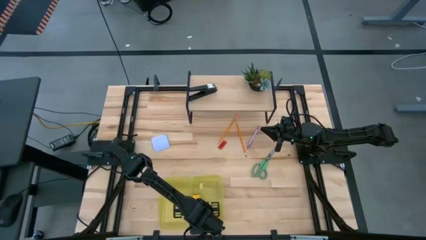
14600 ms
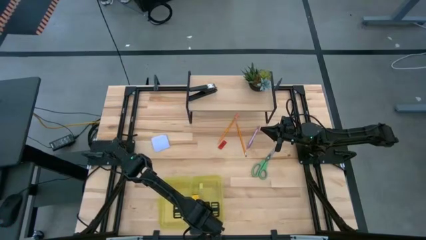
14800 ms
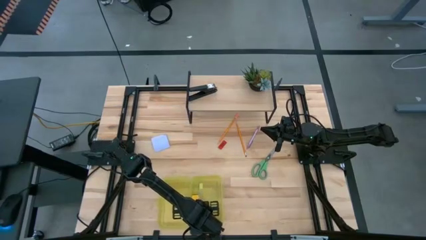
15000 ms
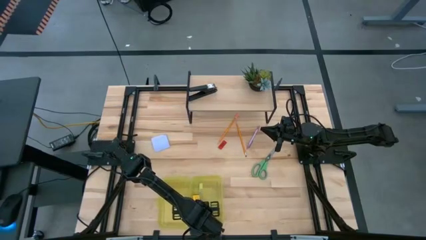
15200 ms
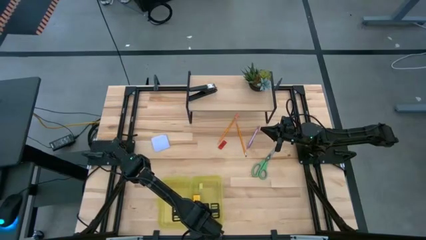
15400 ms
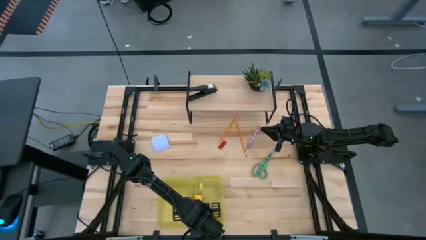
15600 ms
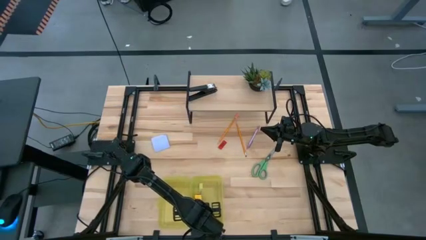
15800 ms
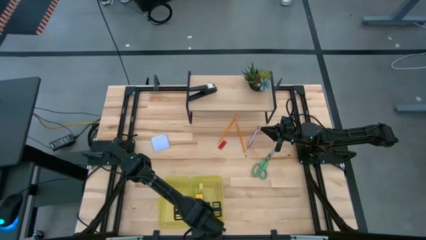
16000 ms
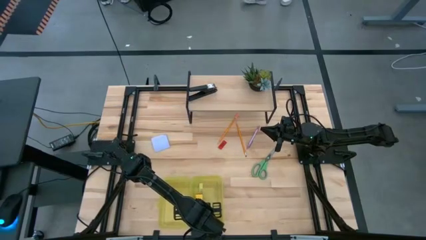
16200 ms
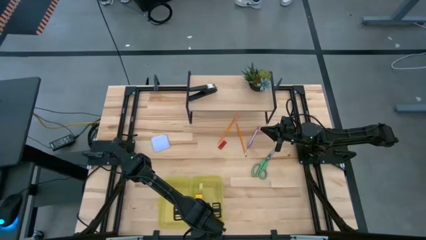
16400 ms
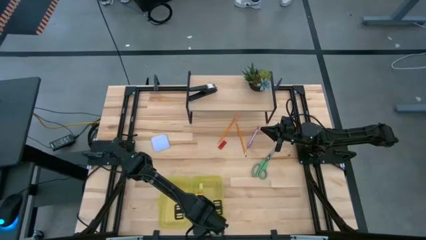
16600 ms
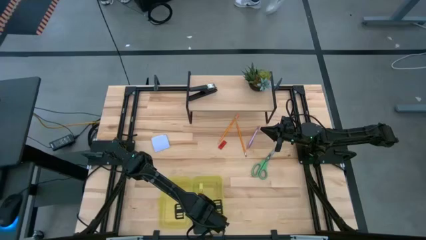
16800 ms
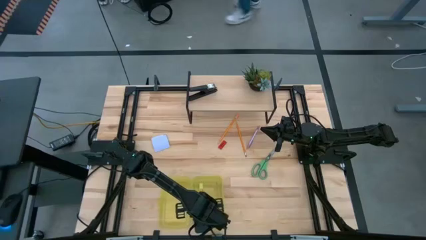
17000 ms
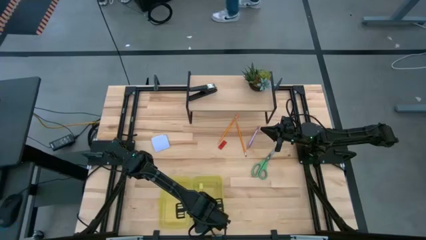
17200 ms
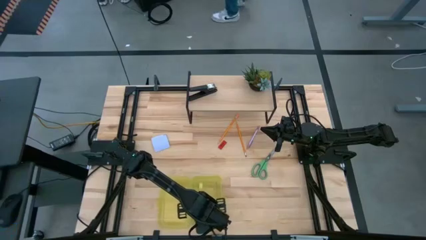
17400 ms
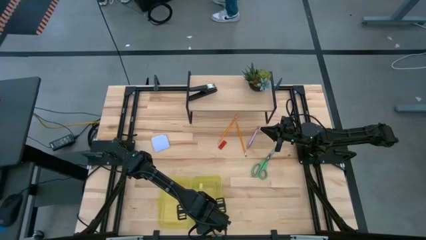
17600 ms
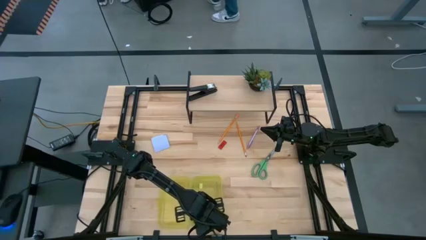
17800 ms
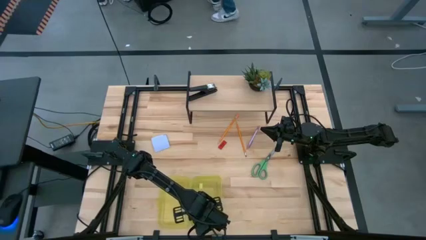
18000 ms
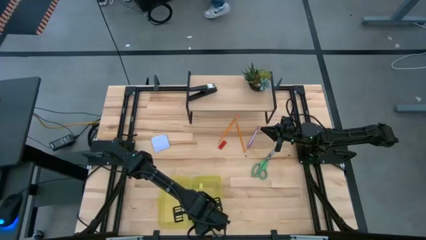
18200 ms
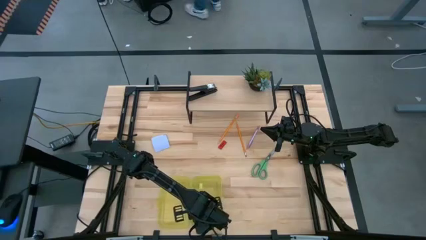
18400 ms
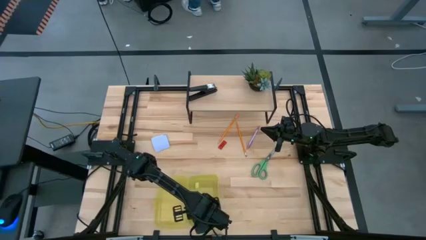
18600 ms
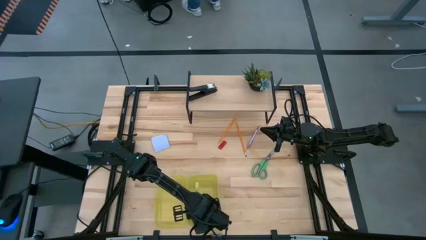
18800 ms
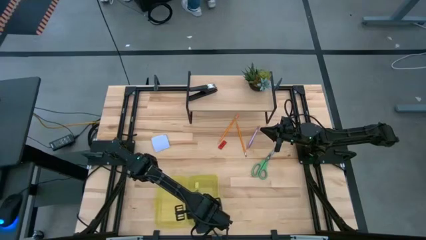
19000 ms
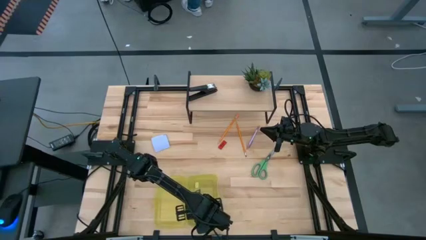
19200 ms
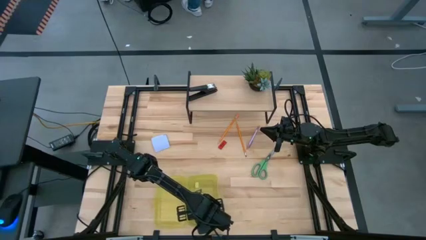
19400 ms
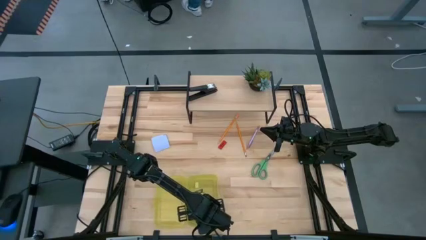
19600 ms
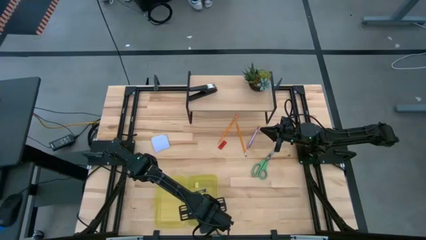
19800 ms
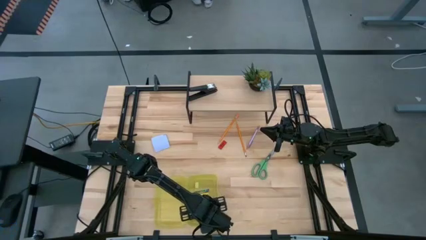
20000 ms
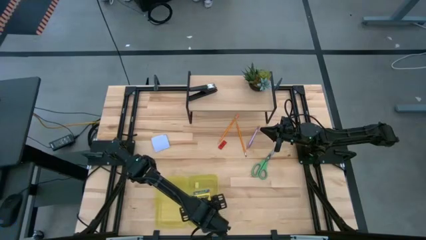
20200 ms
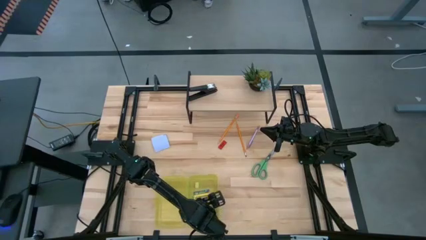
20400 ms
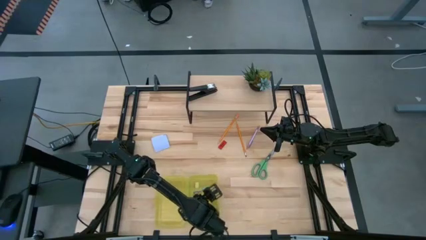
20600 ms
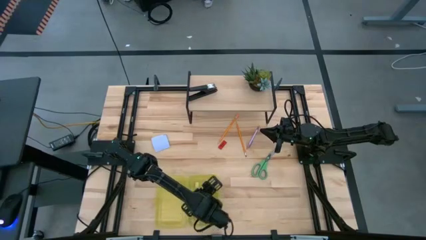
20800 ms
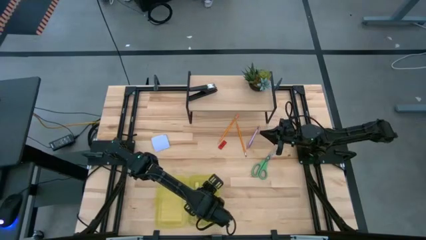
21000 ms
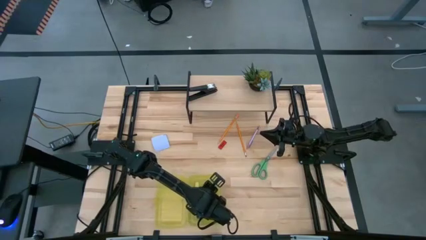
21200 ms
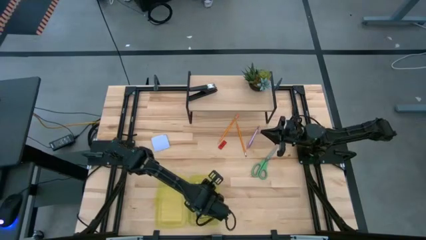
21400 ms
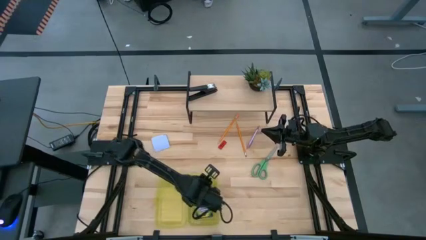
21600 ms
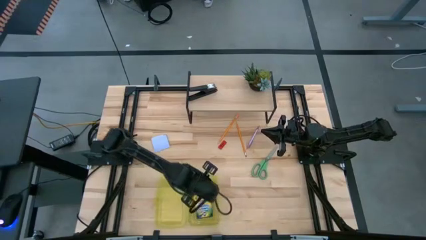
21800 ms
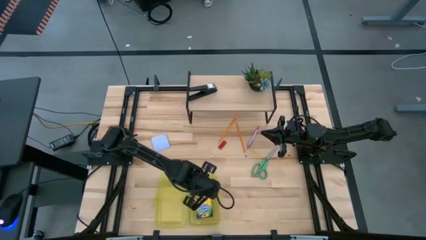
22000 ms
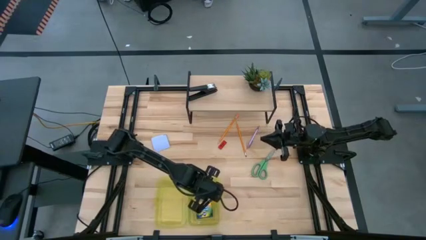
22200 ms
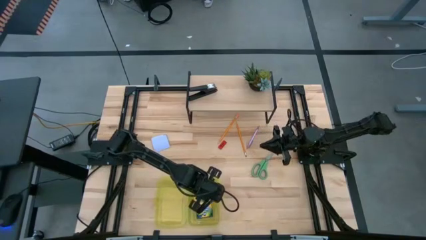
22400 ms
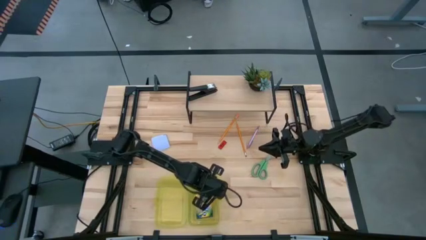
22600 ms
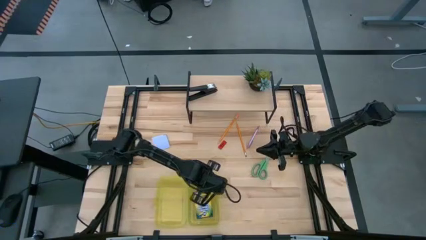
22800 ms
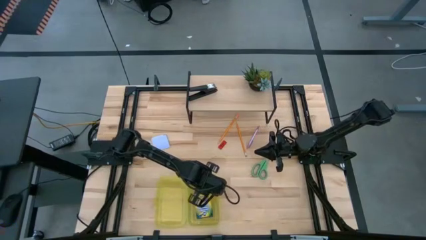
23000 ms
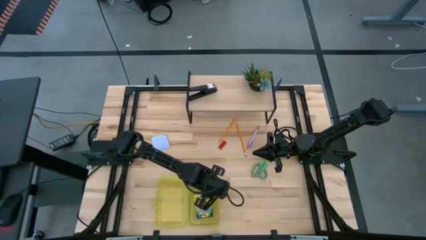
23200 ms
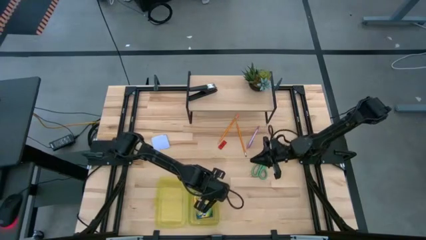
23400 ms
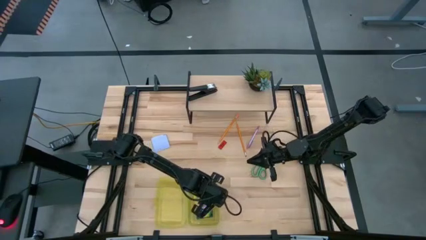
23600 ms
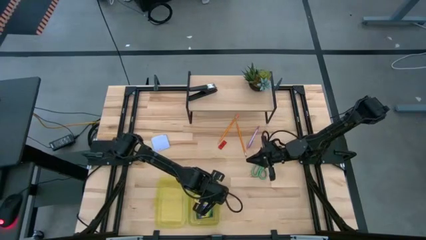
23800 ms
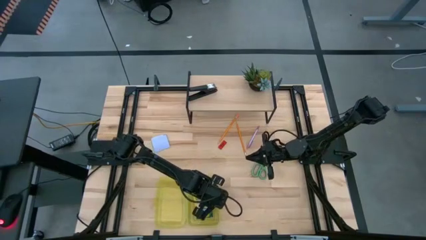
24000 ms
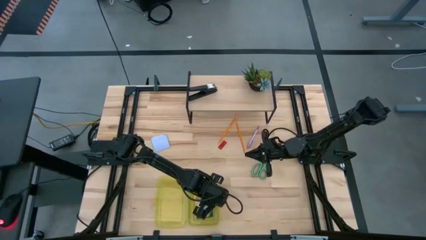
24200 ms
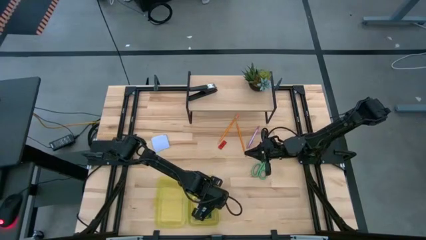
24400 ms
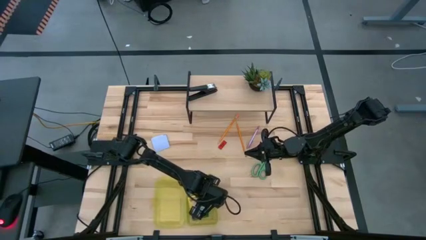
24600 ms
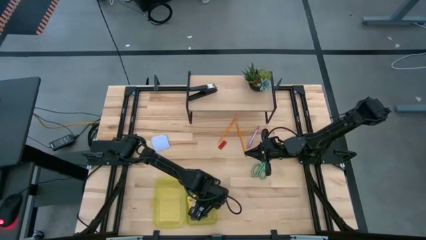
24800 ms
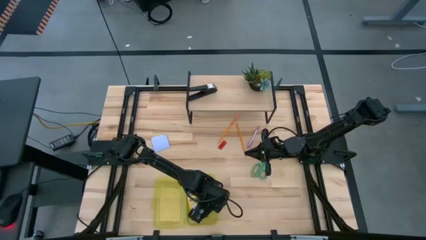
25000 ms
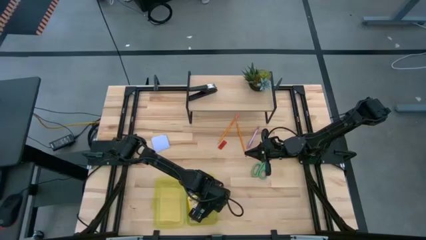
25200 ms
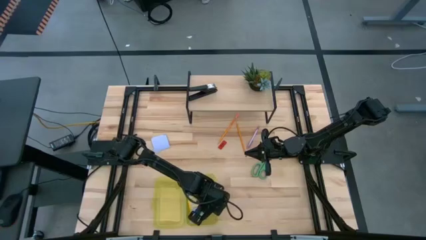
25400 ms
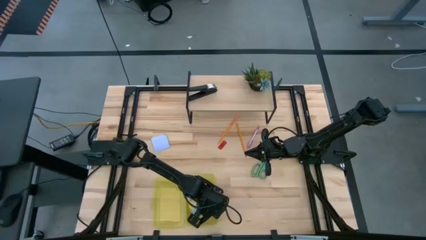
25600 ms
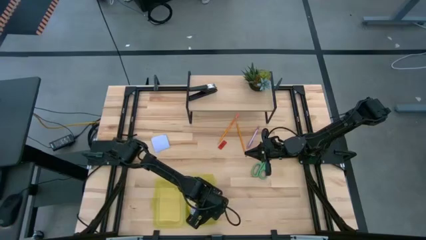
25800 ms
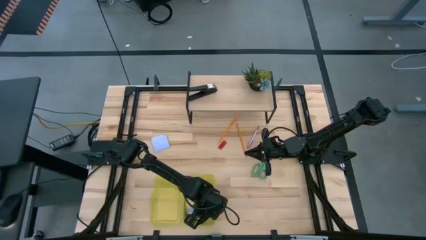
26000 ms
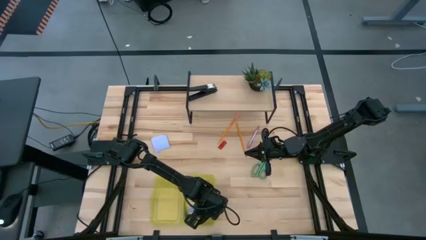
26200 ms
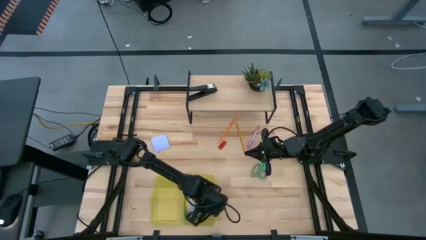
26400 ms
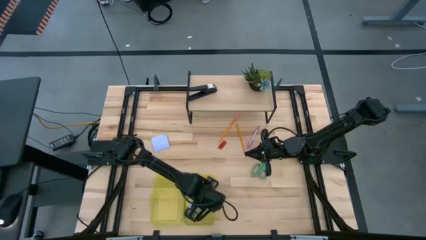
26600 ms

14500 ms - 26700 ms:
Task: Pack school essentials
Put the yellow crayon box into the yellow supply box
